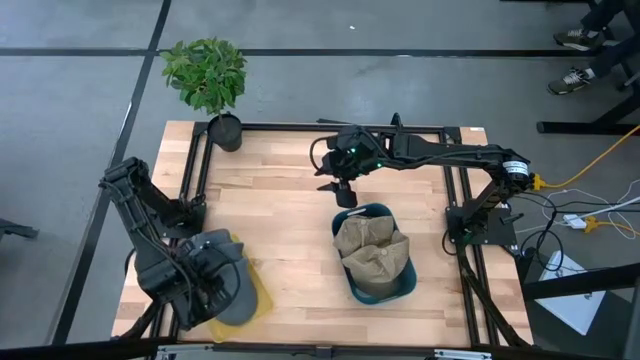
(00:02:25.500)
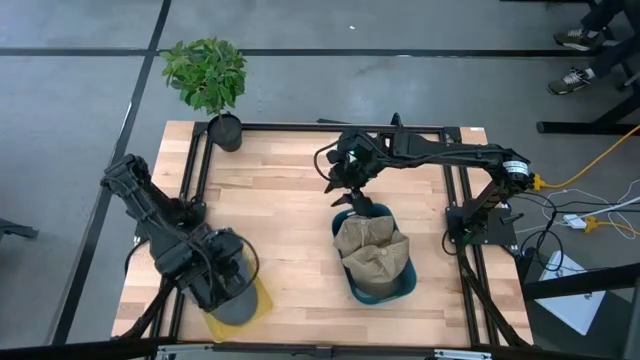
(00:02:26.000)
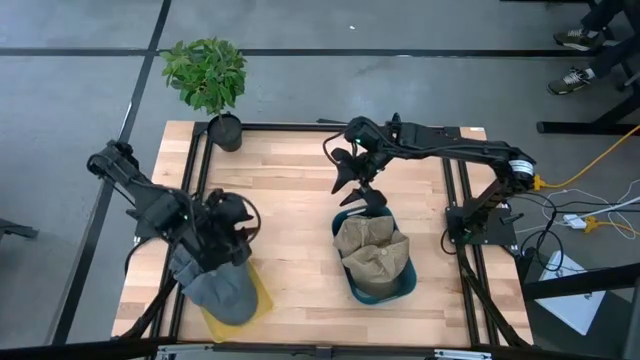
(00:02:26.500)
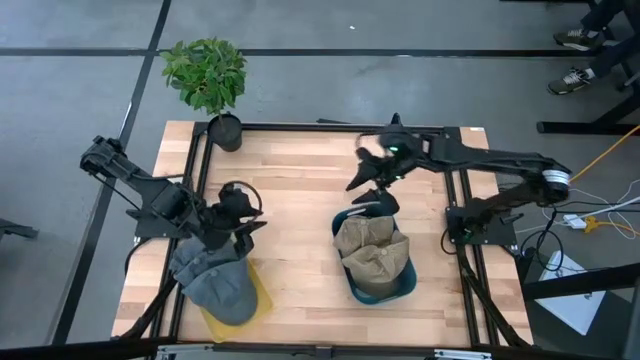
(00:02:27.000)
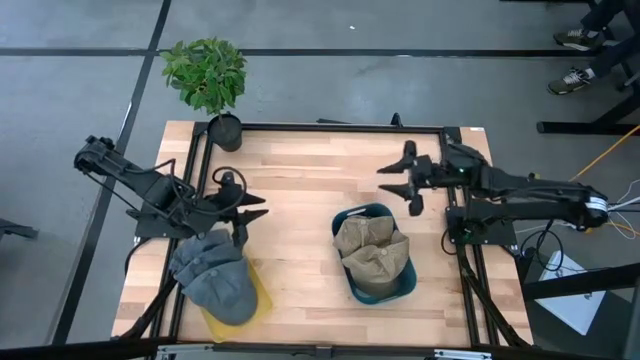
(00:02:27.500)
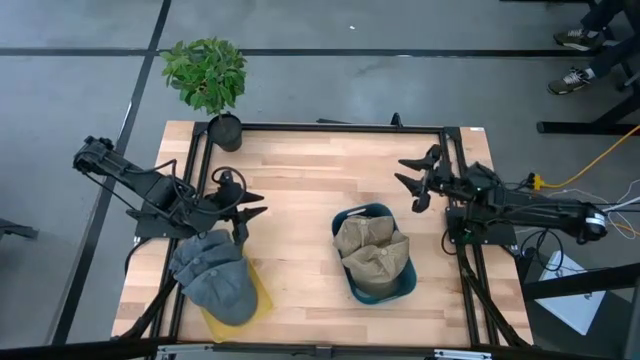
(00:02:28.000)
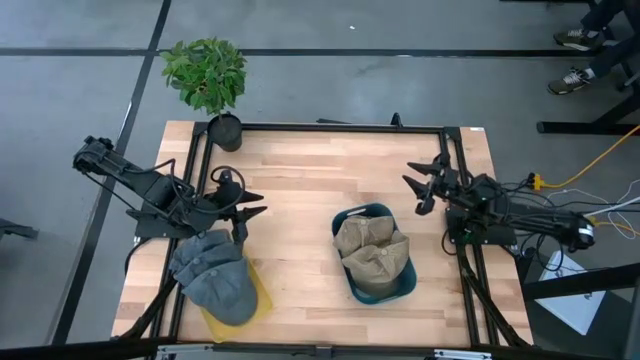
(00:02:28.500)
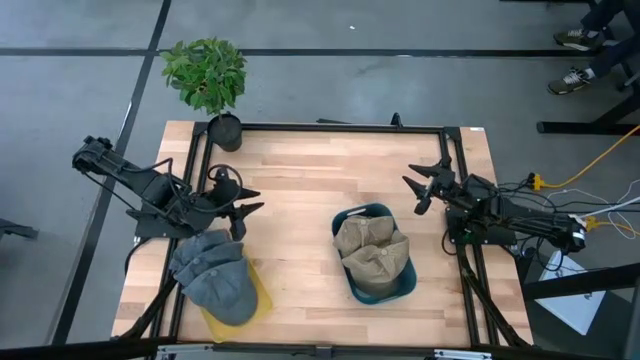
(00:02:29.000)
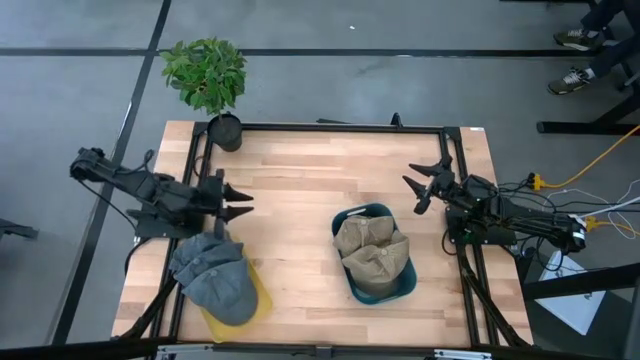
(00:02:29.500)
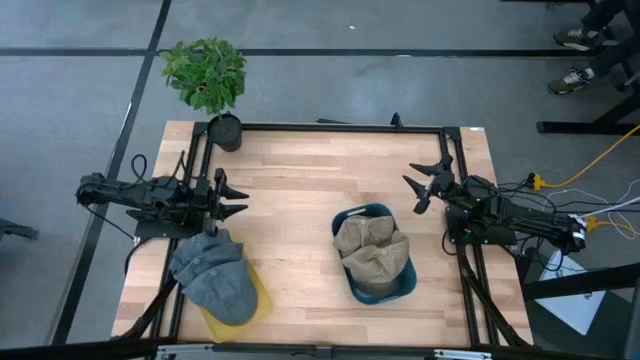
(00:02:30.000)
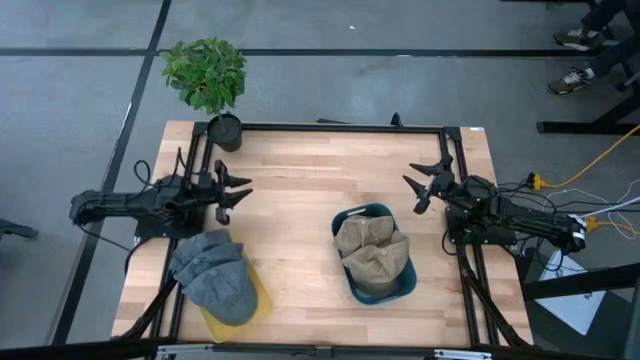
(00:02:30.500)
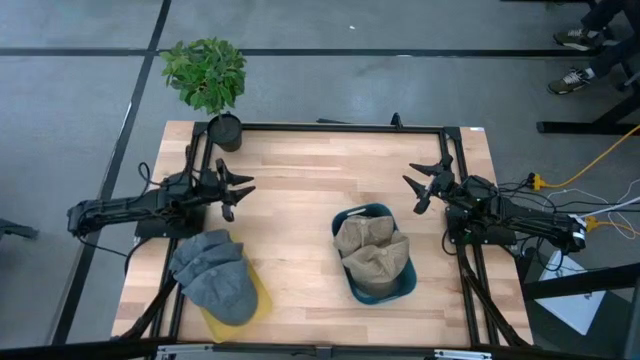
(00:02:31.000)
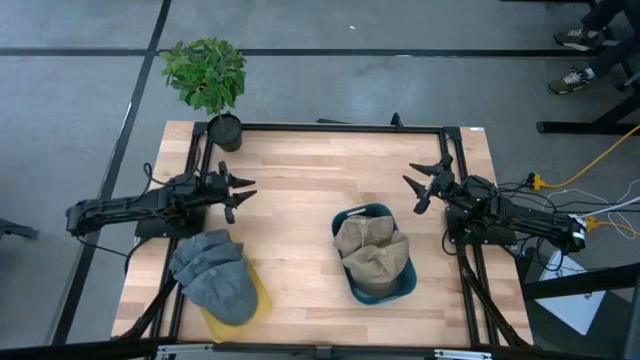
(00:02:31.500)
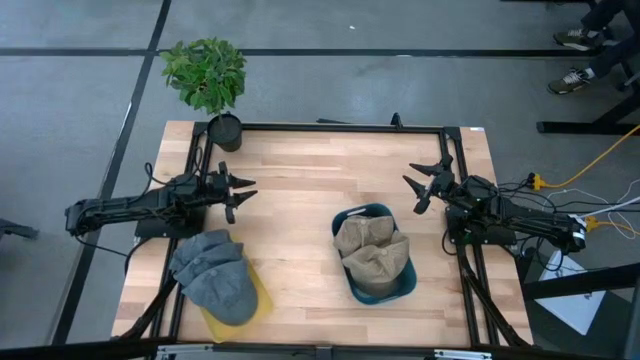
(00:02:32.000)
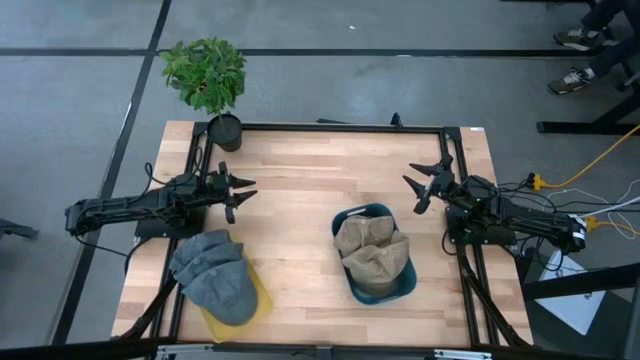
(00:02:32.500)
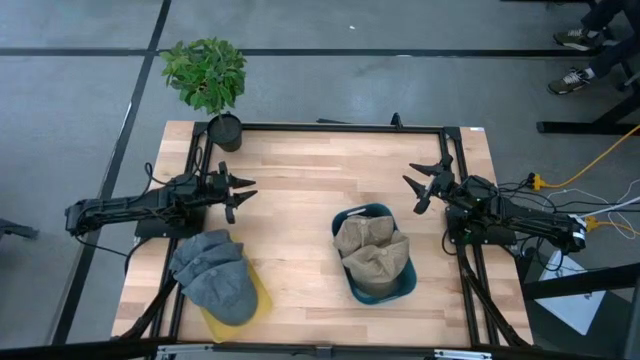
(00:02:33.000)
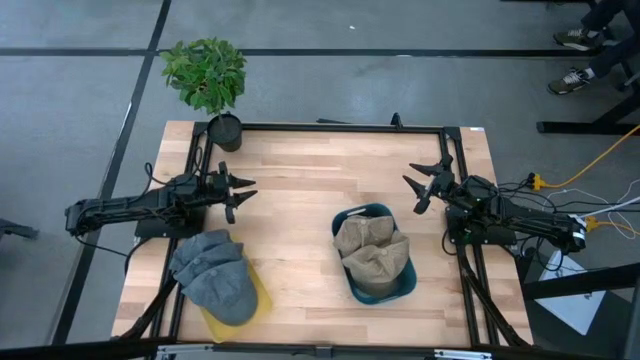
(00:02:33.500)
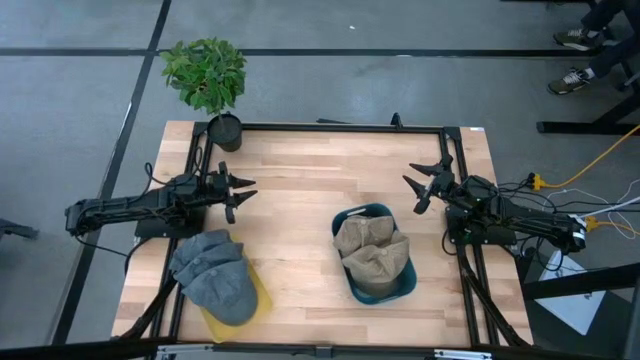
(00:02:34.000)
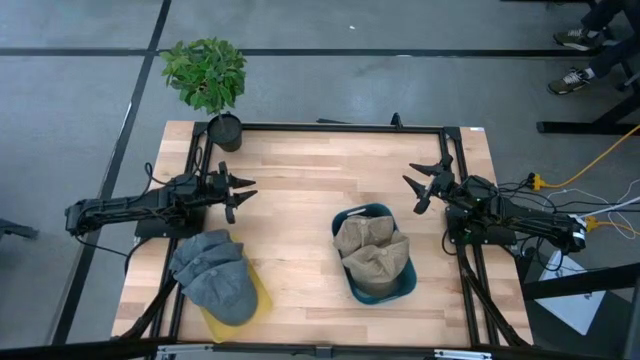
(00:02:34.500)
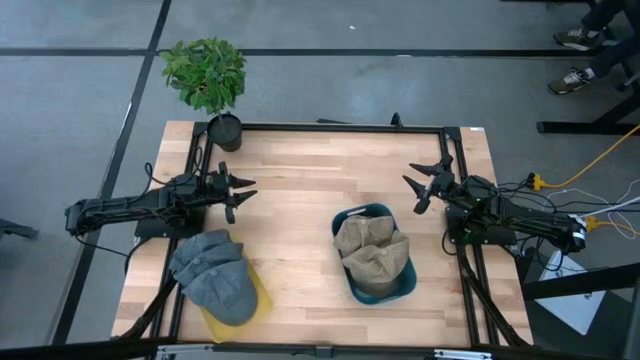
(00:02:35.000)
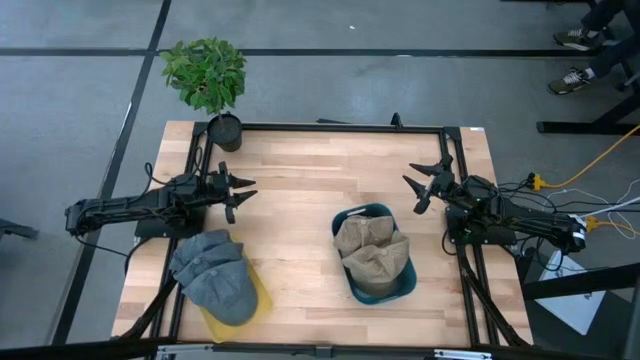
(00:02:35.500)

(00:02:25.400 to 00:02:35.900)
Task: Pick & Place hat
Return to Home Position

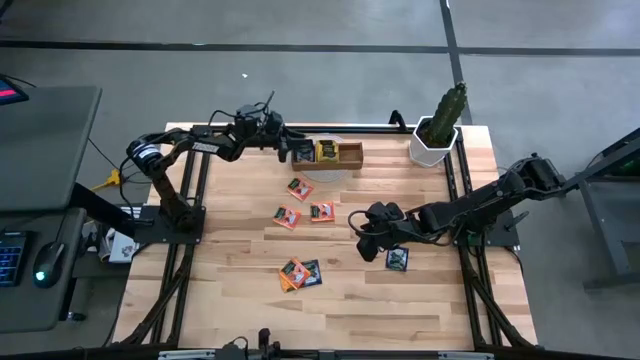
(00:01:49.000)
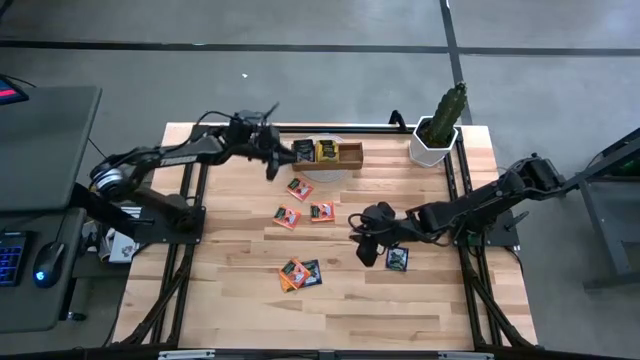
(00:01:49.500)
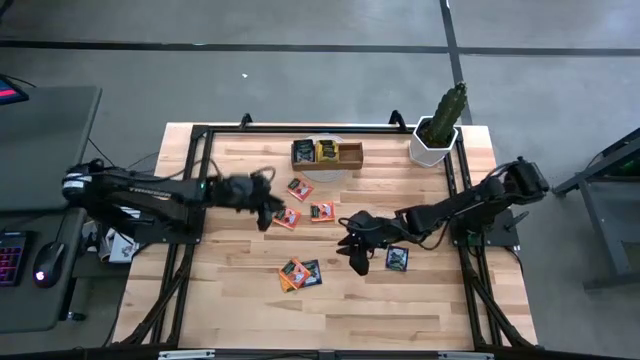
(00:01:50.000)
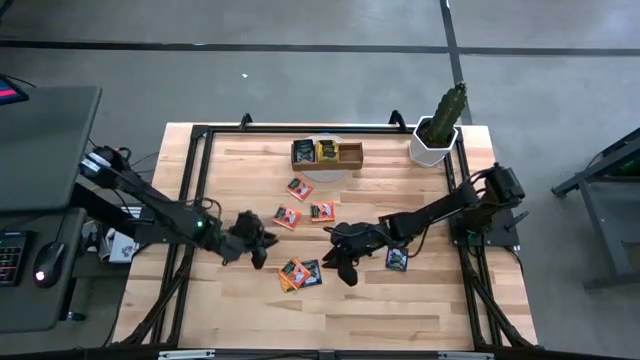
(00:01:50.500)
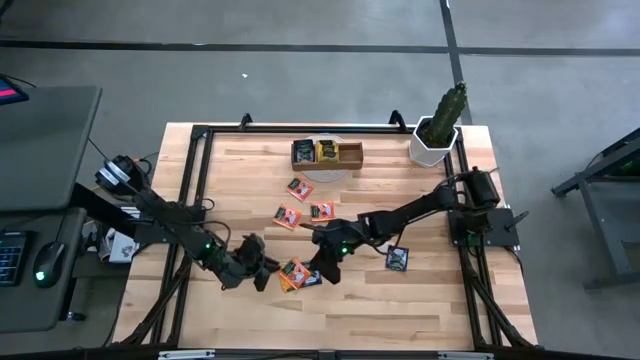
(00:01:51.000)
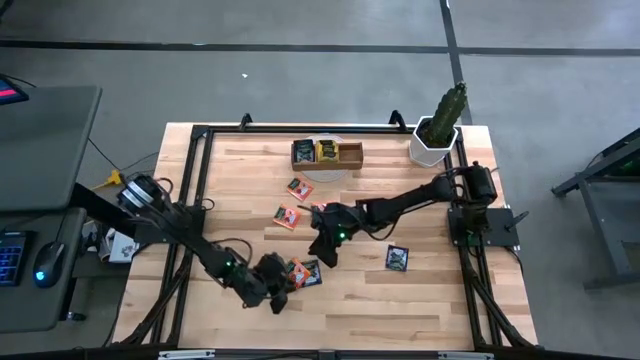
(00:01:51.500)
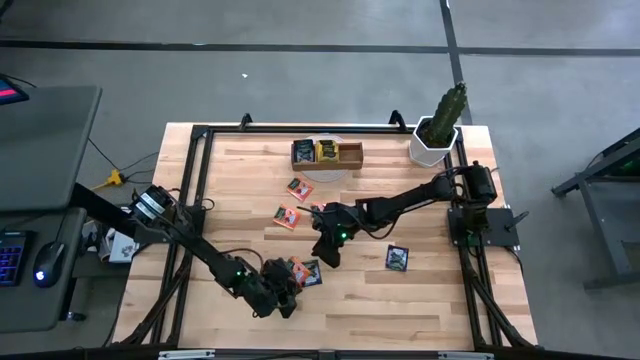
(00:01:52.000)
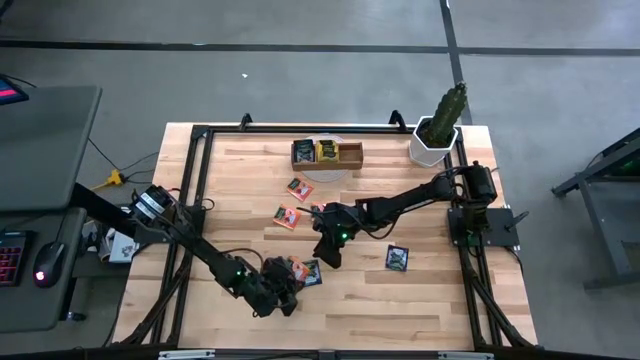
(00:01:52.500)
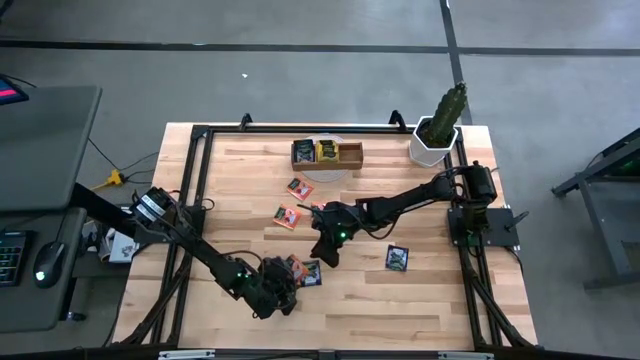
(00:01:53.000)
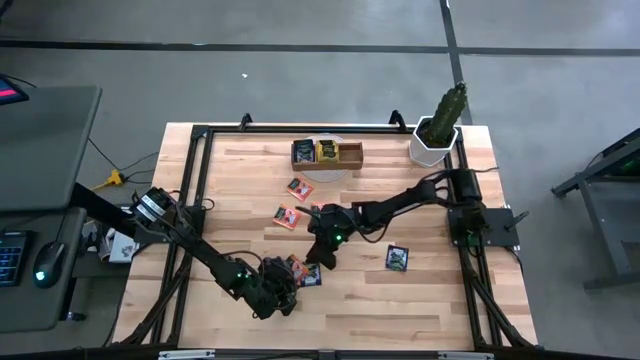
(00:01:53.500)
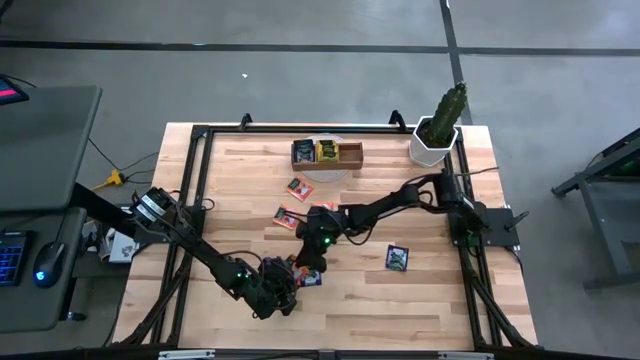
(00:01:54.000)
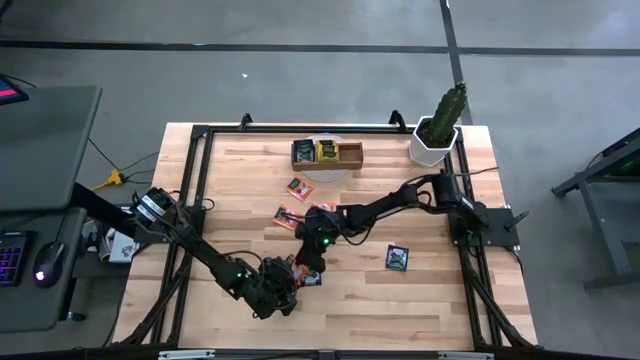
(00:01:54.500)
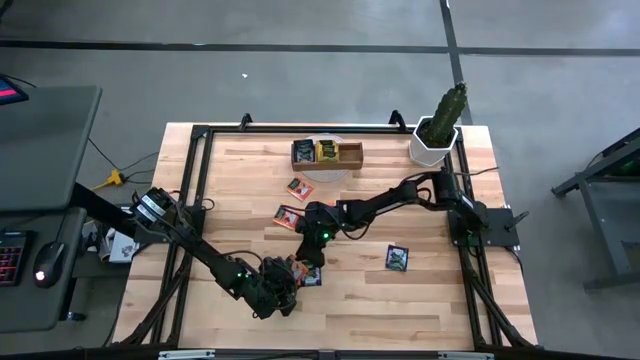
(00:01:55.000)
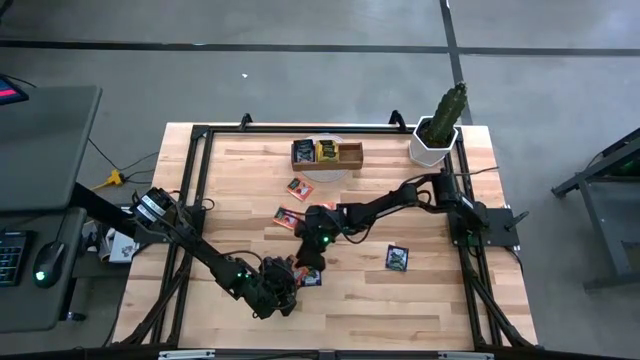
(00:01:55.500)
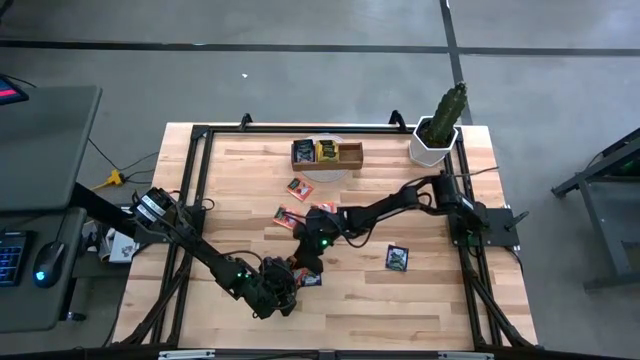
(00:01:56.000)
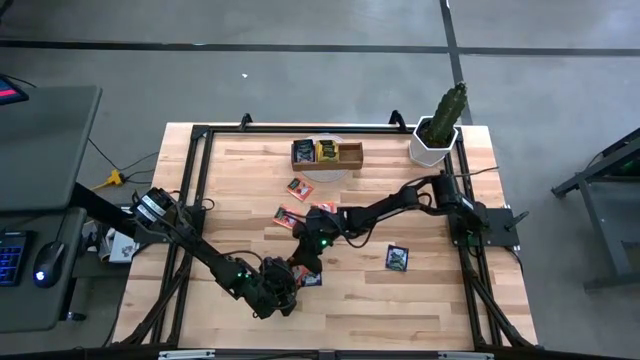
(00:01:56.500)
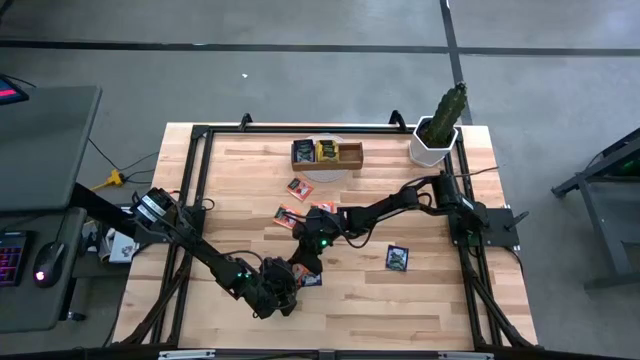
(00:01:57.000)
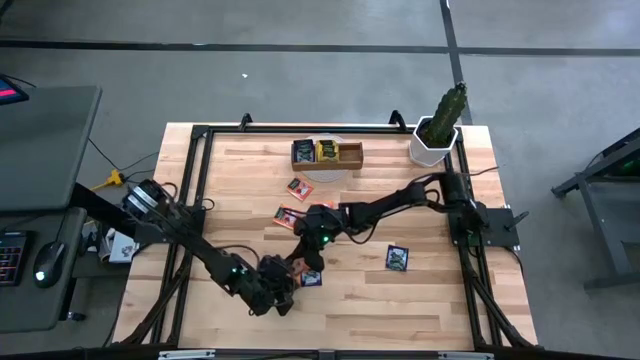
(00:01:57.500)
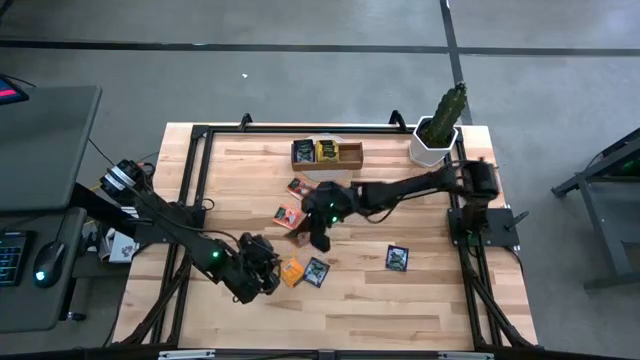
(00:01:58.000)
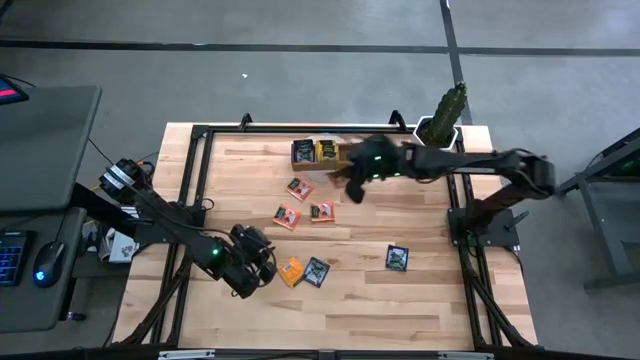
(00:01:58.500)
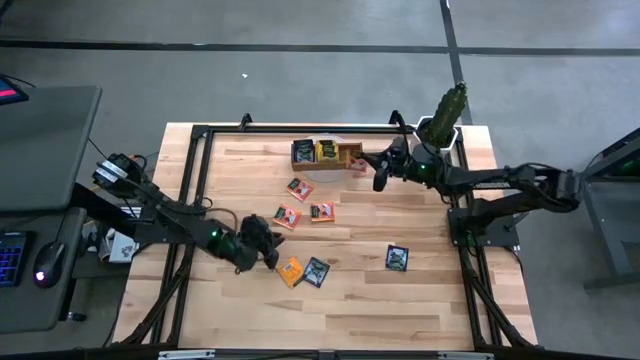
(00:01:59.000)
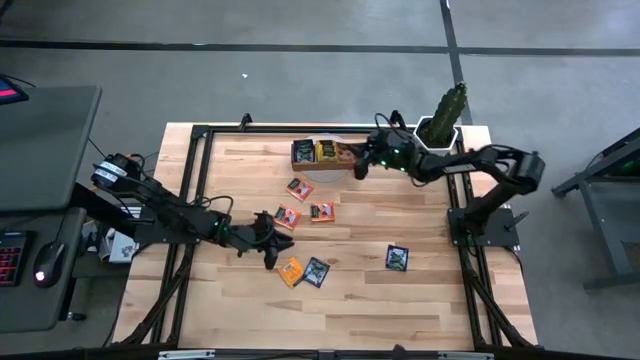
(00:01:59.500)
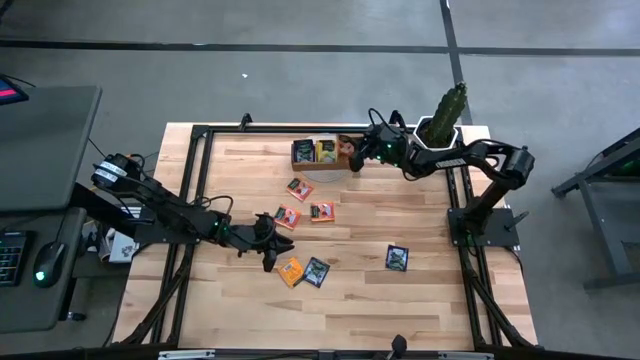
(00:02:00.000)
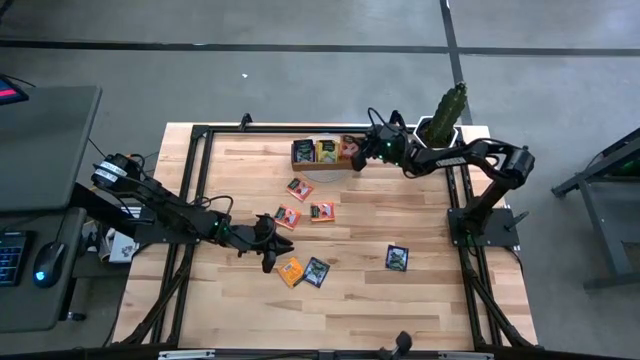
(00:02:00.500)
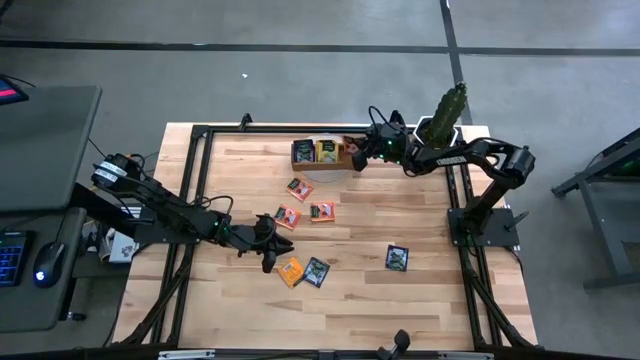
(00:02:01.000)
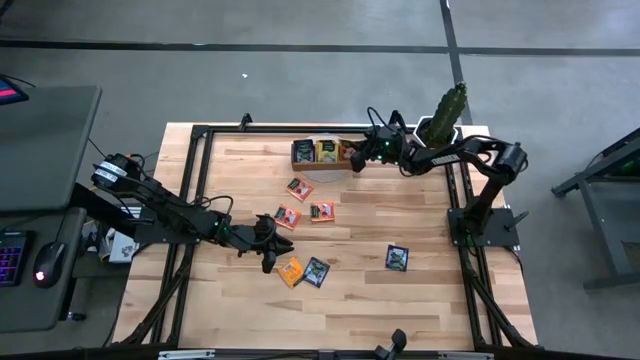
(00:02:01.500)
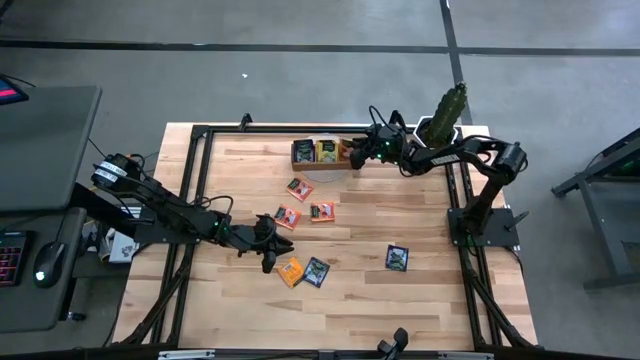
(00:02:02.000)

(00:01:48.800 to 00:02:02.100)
Task: Pick & Place Tea
Put the orange tea bag in the right compartment of the organizer
